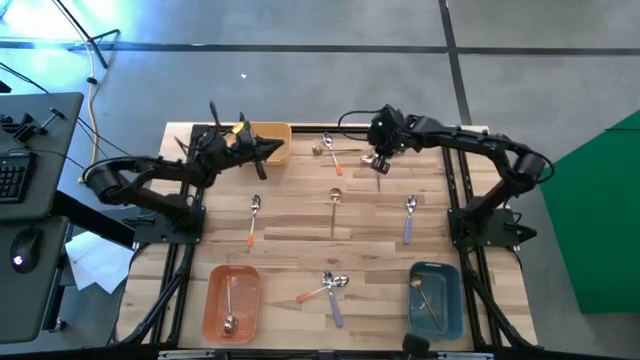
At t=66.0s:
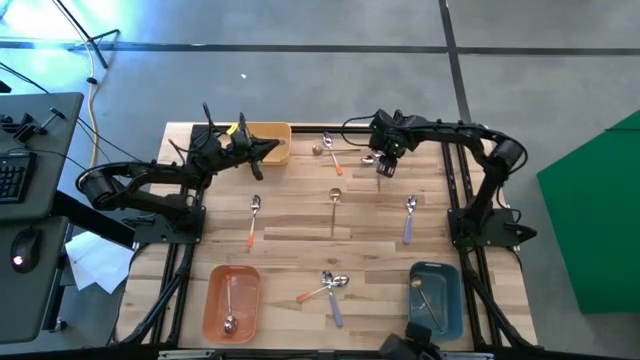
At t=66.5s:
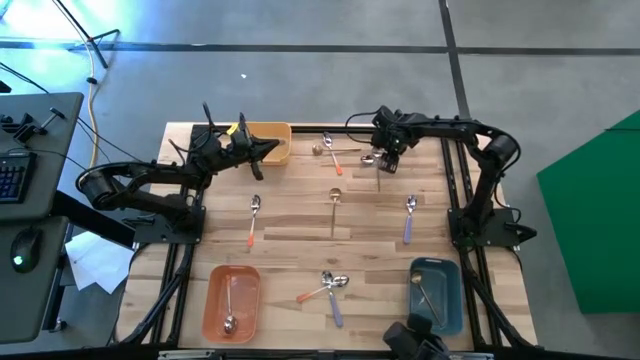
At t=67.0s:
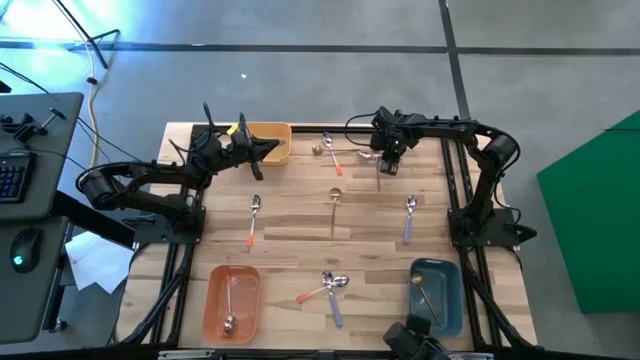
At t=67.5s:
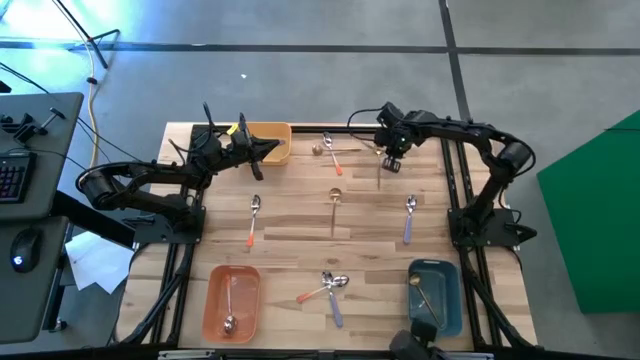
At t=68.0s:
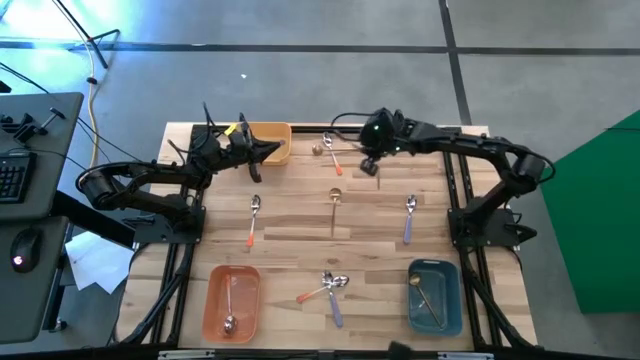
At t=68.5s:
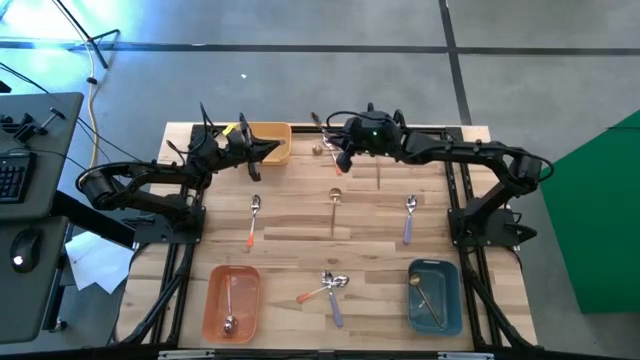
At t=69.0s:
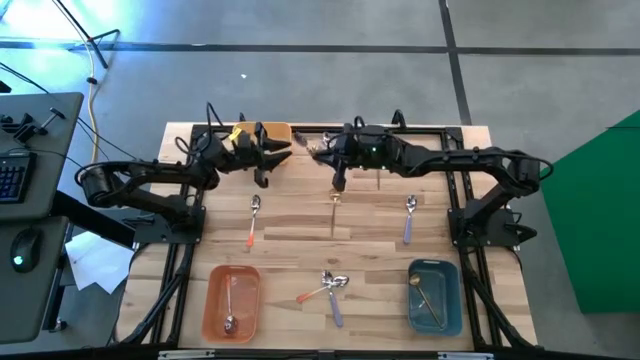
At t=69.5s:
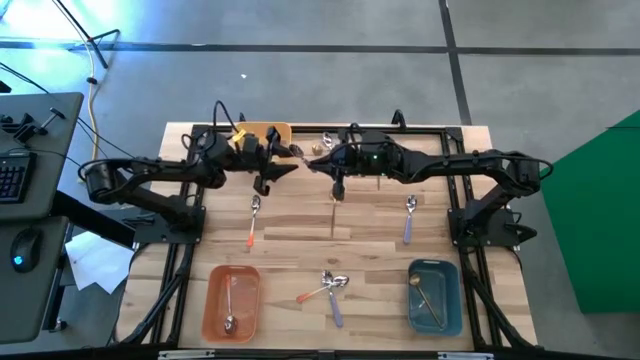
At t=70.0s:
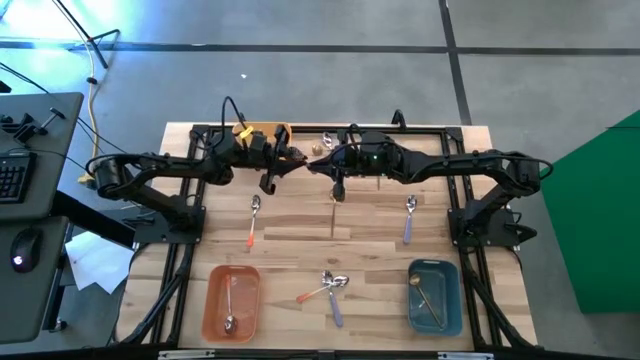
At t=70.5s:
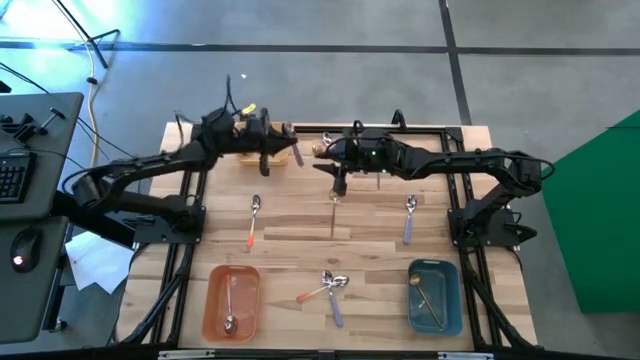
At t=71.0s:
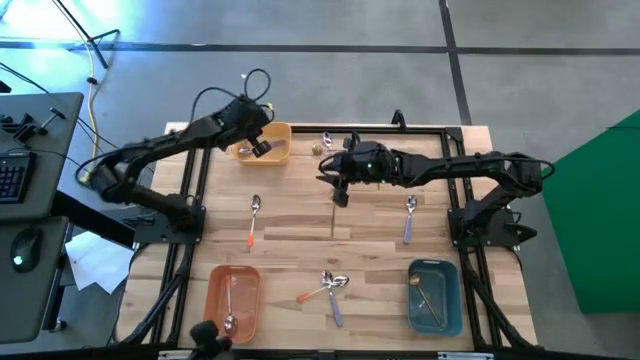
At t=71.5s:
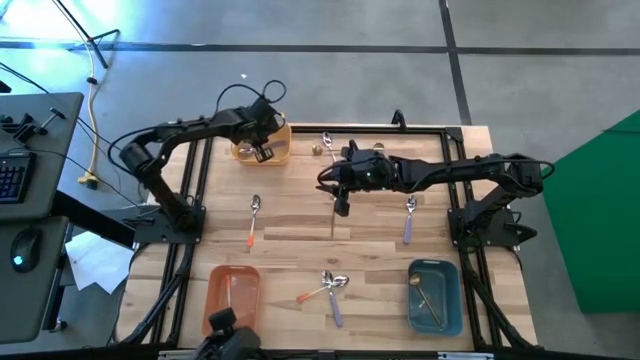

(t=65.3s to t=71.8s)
Task: Sort silverware by color (type)
Put the purple spoon into the yellow bin

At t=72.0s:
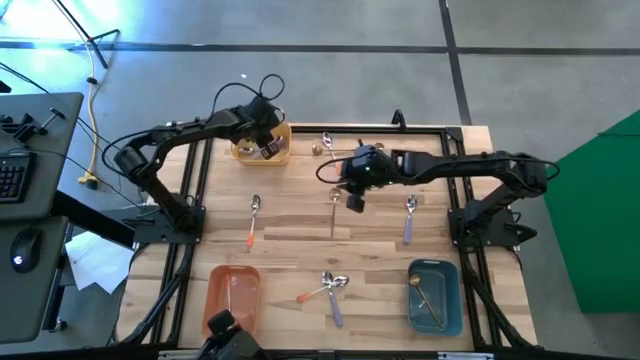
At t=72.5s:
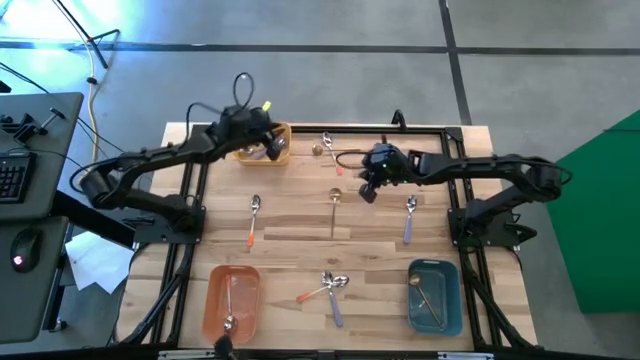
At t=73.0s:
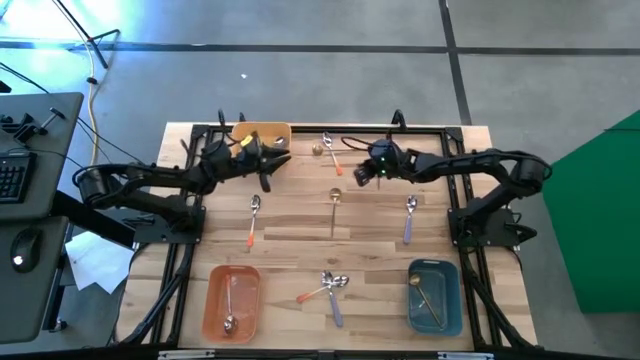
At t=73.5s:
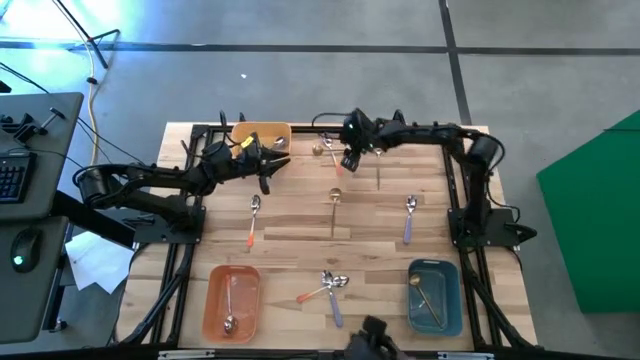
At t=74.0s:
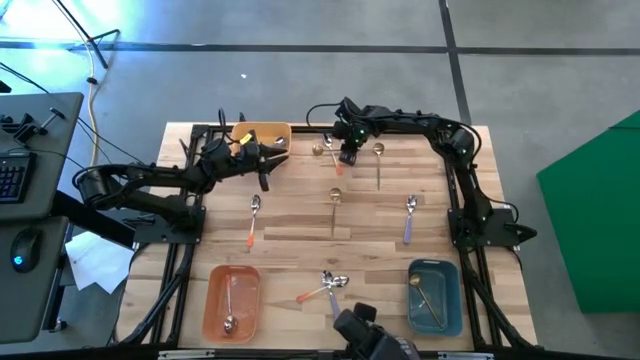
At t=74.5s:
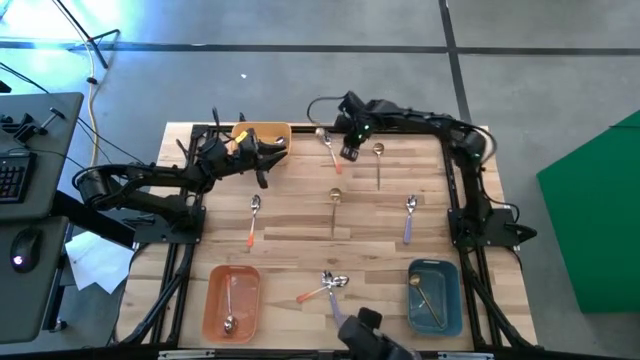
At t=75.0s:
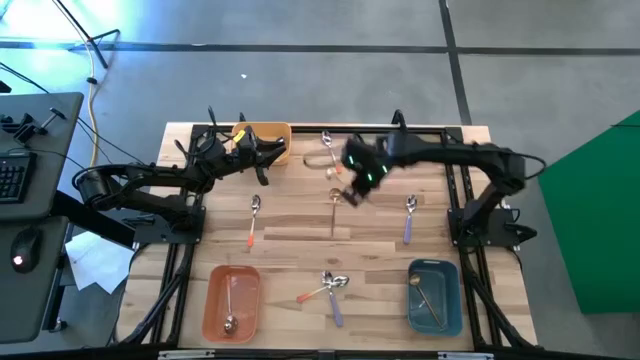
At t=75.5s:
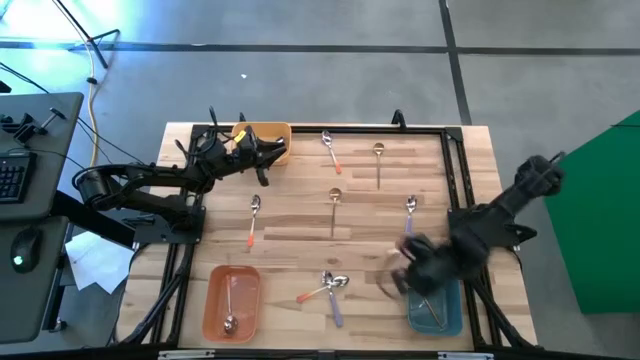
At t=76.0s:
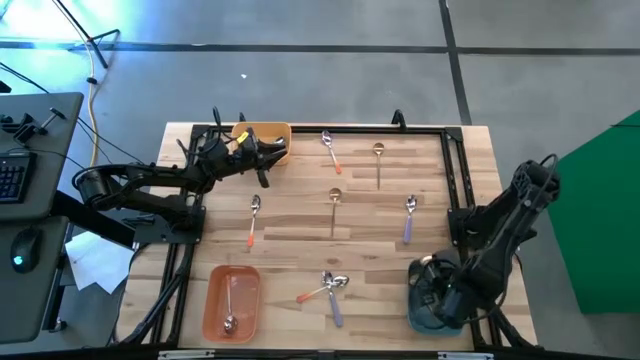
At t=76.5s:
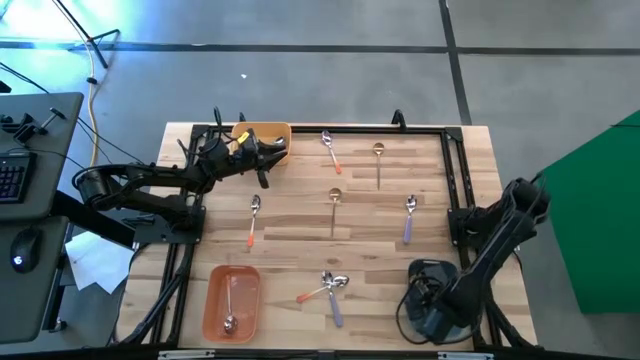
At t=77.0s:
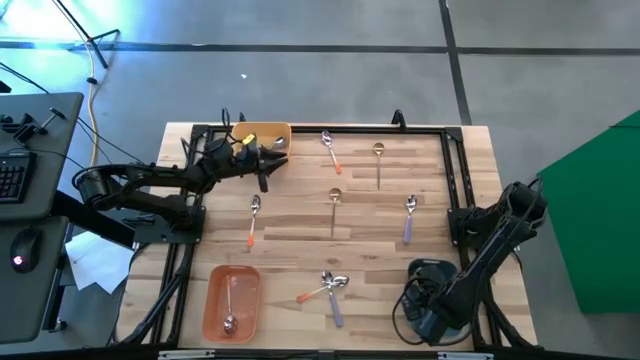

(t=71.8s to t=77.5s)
Put the golden spoon into the blue bin

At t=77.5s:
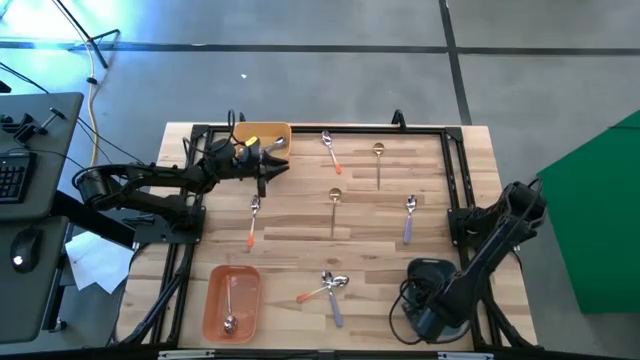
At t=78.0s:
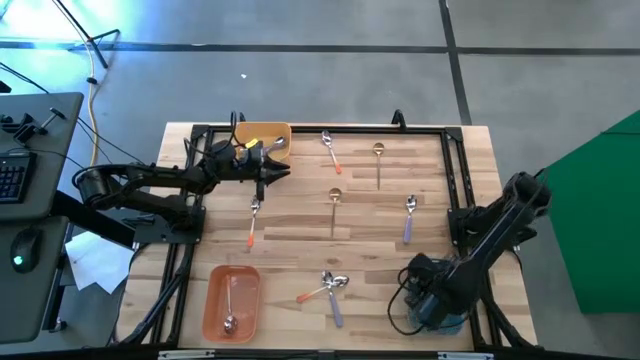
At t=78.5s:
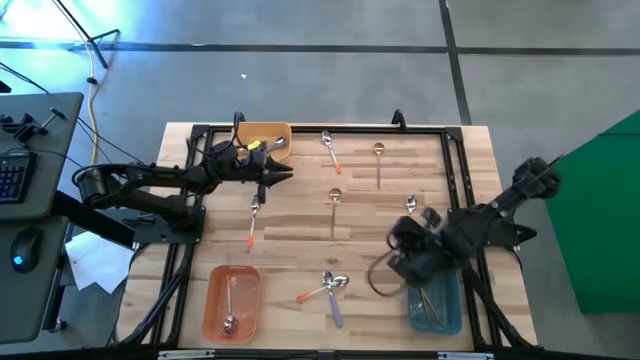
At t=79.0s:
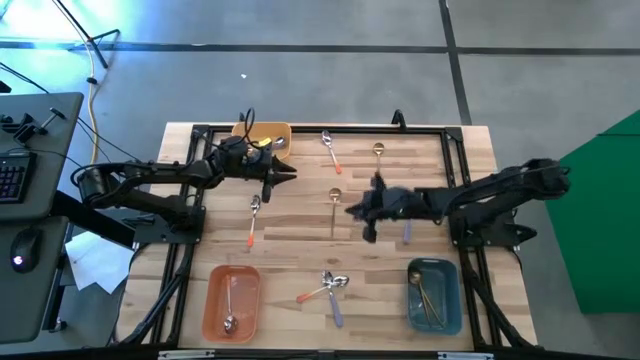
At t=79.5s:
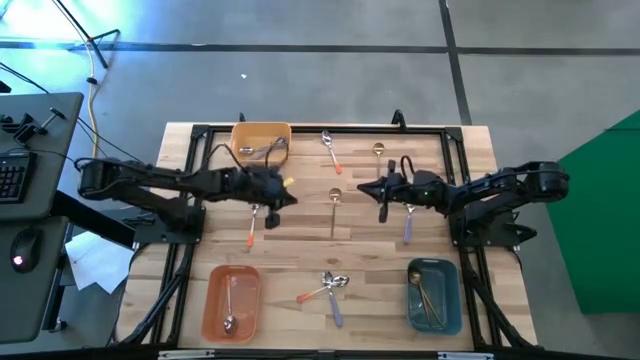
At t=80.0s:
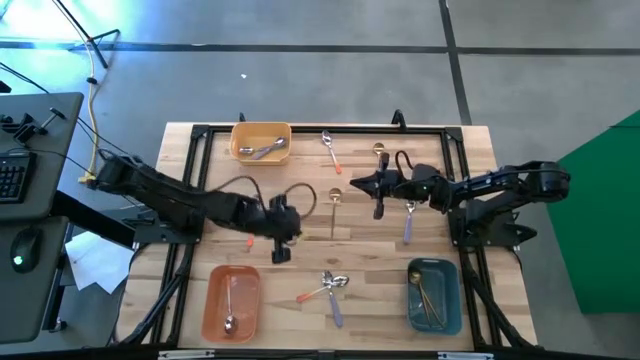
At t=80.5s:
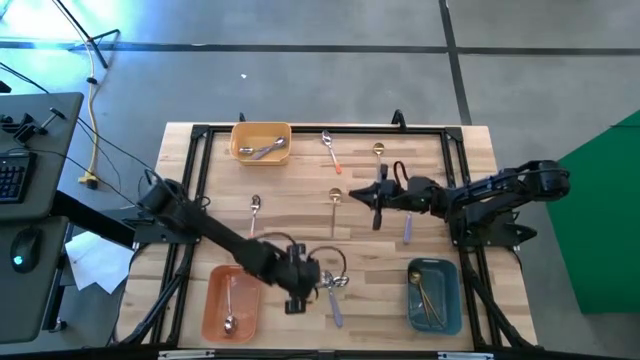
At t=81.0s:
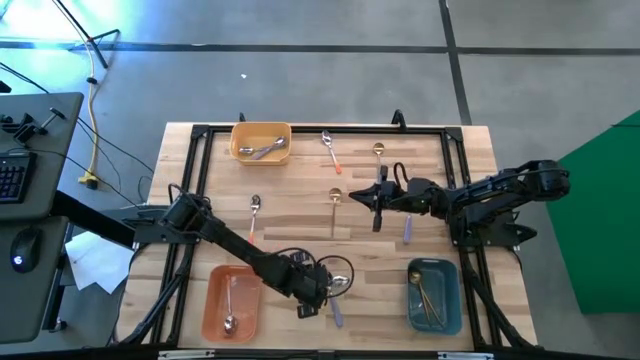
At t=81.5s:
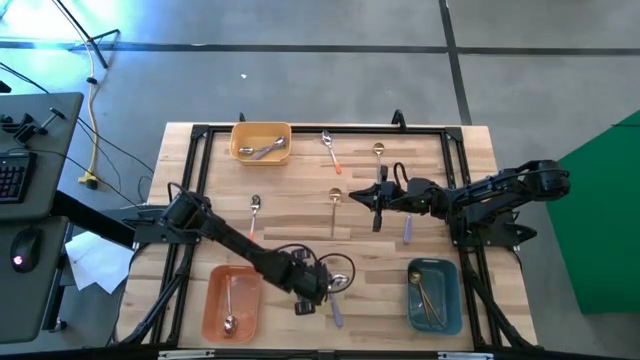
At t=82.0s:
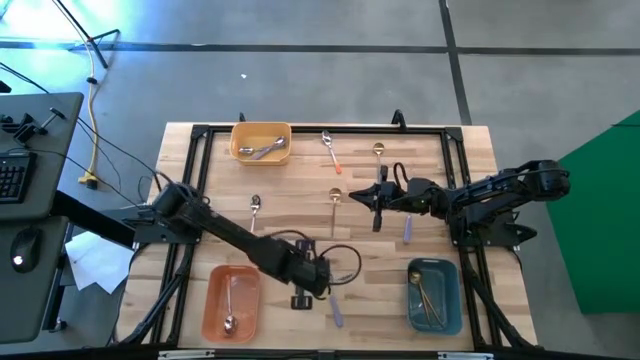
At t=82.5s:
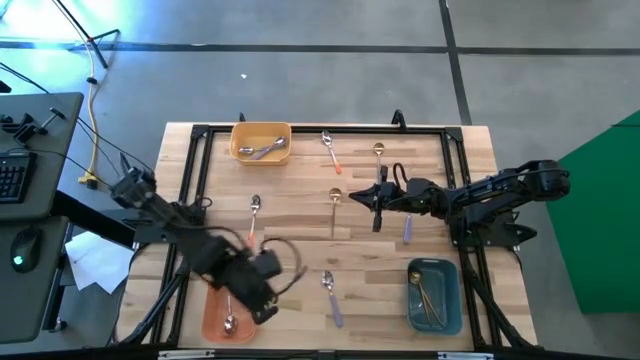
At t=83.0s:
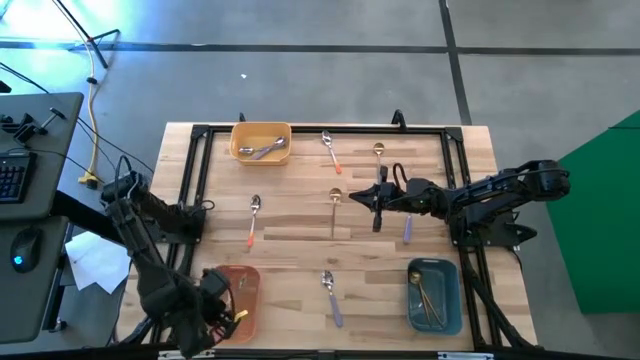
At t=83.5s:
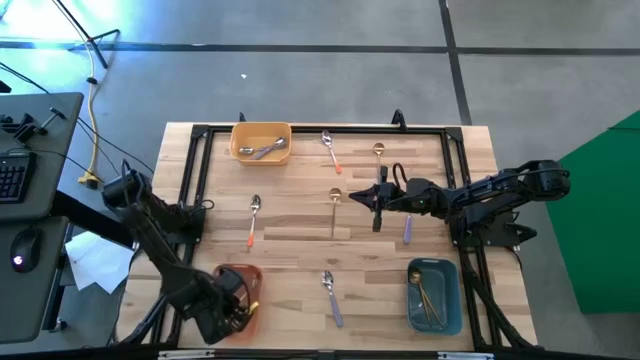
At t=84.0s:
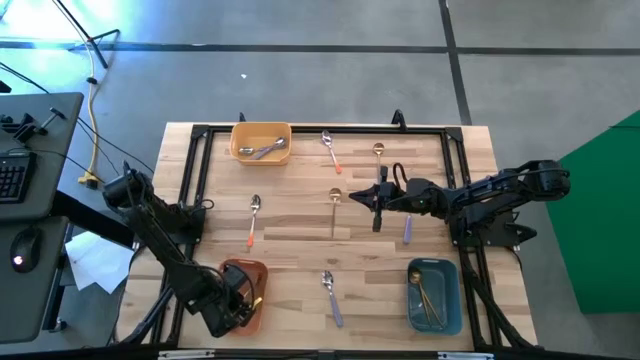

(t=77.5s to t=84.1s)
Put the orange spoon into the orange bin
